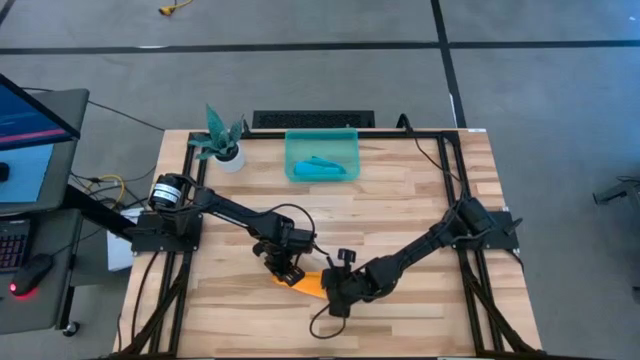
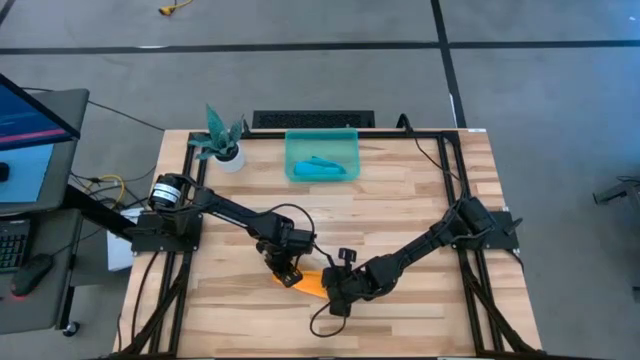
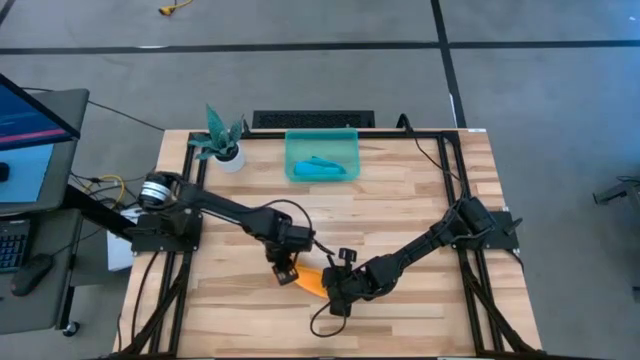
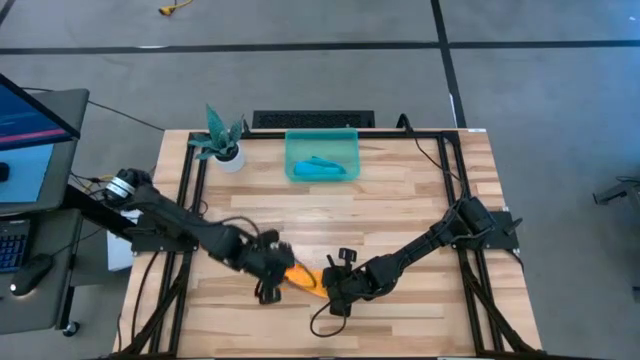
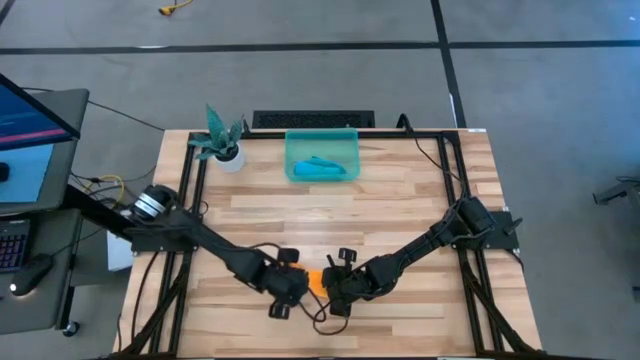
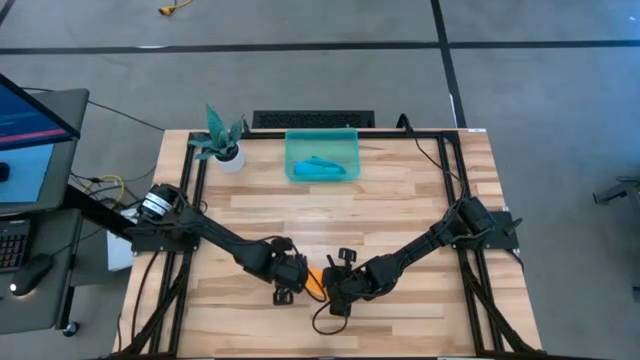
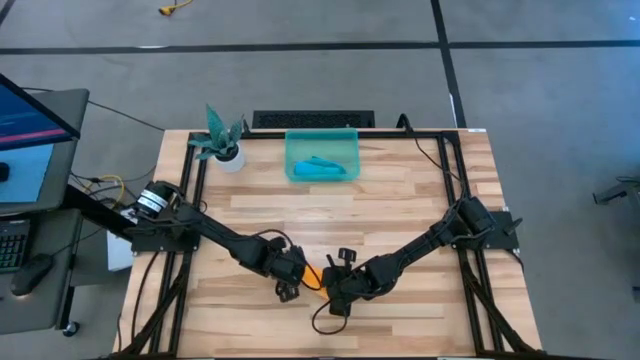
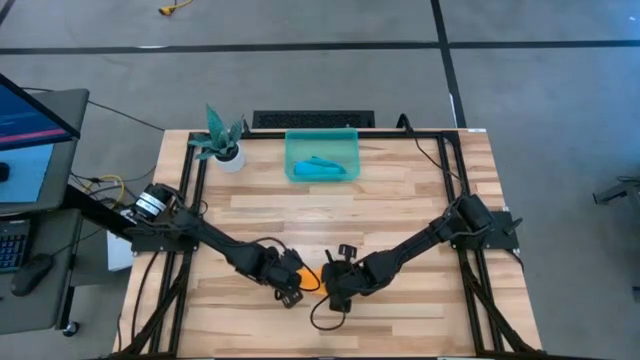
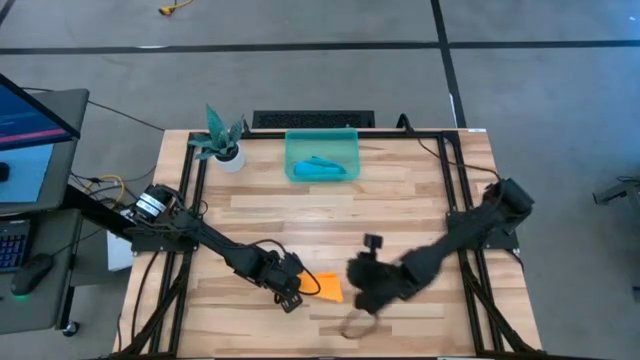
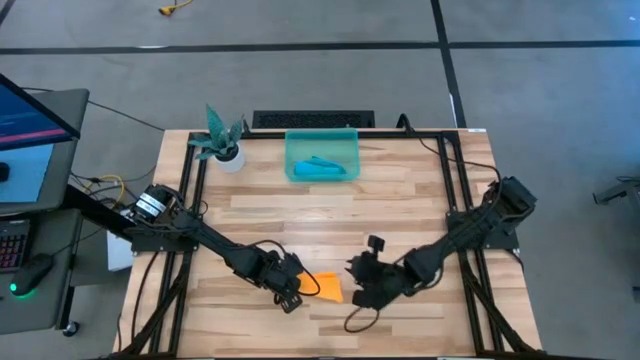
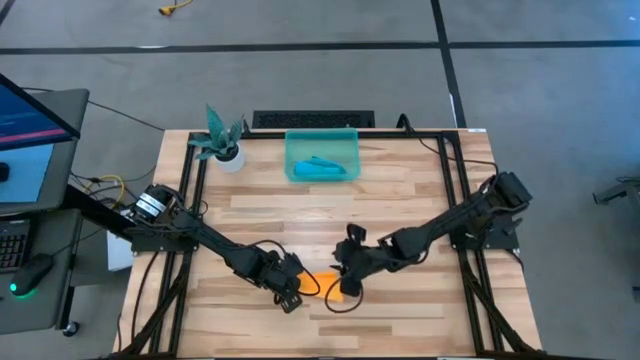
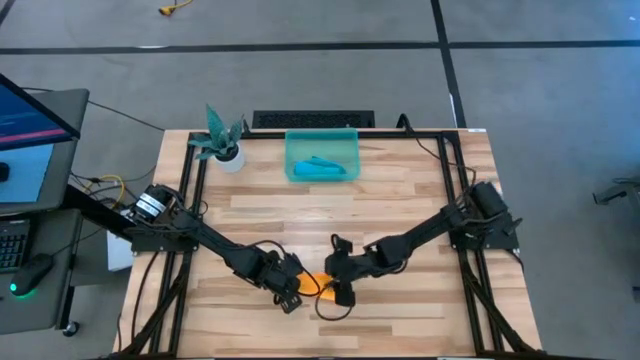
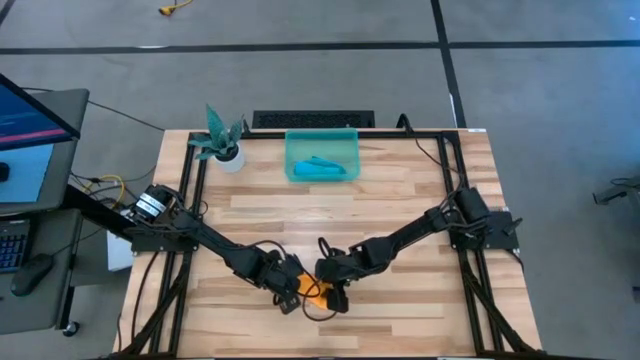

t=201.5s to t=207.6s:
Task: Roll microfiber towels into tight, uniform cylinder then place into a basket
Roll the orange microfiber cloth

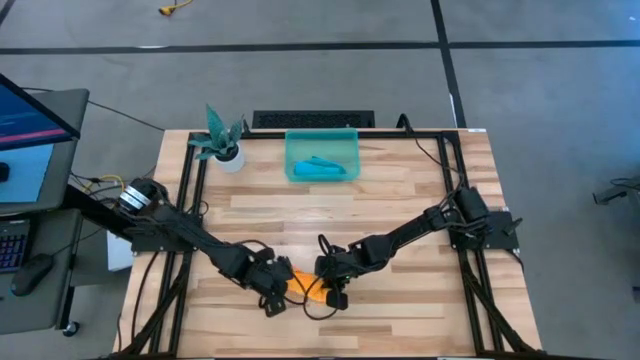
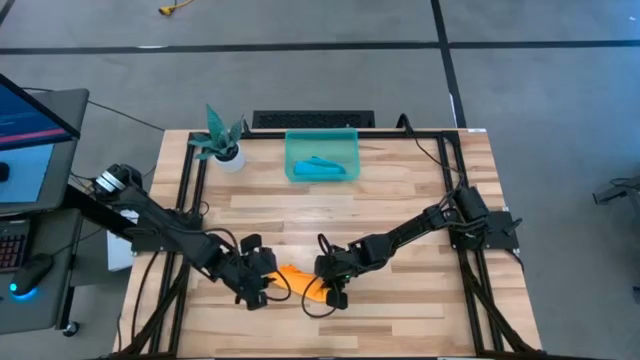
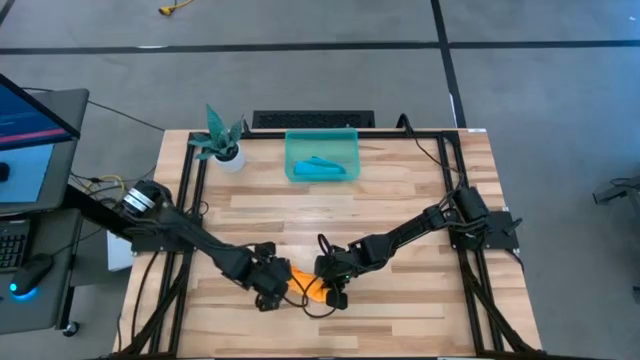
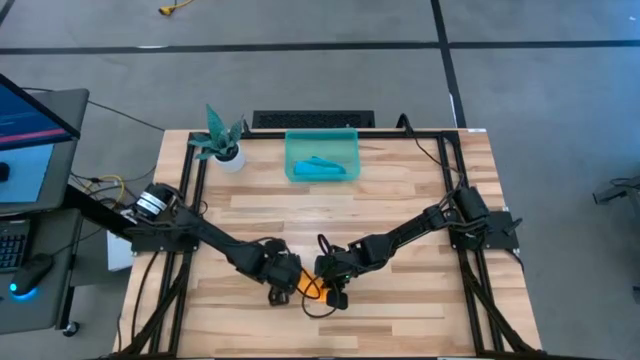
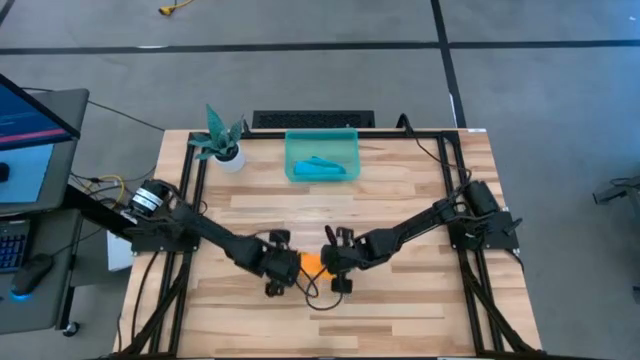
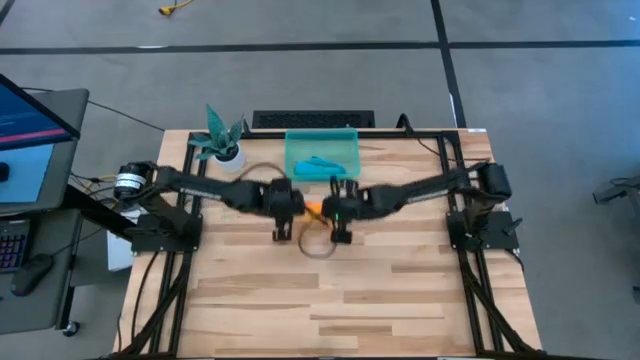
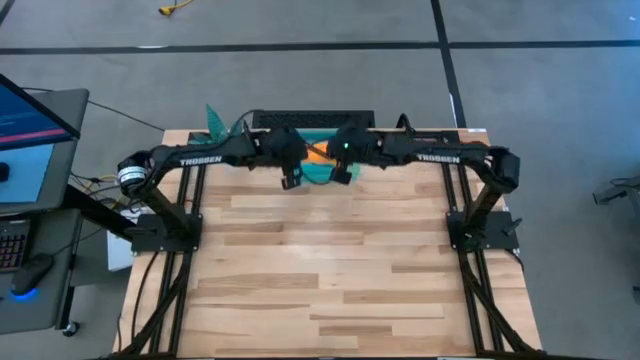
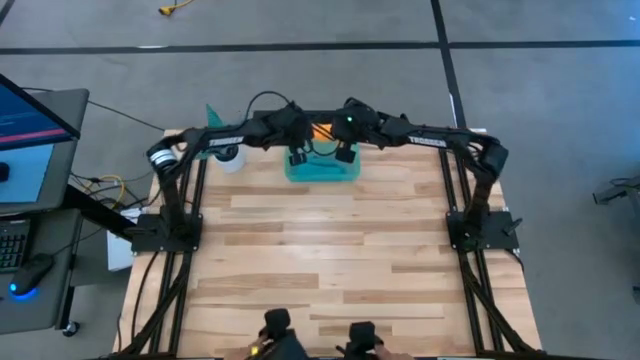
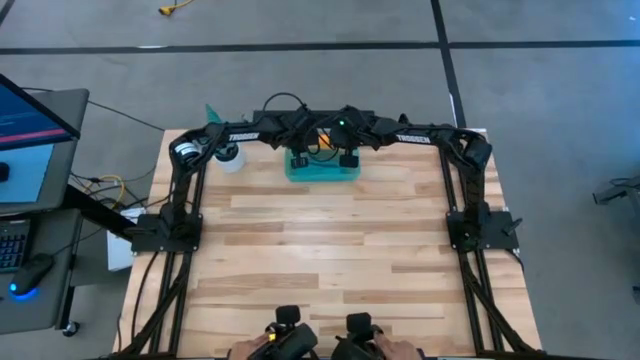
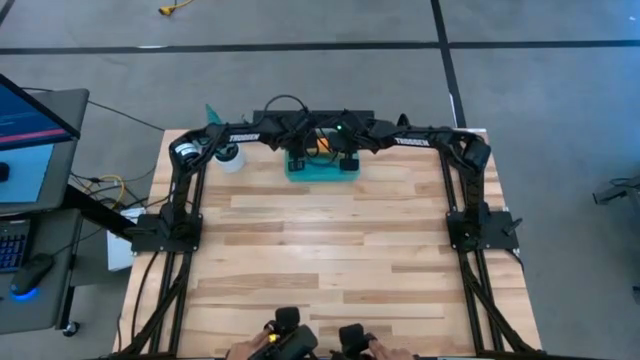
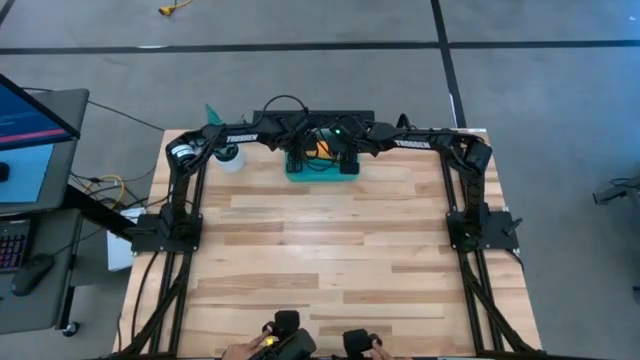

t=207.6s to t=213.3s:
Put the rolled orange microfiber cloth into the green bin

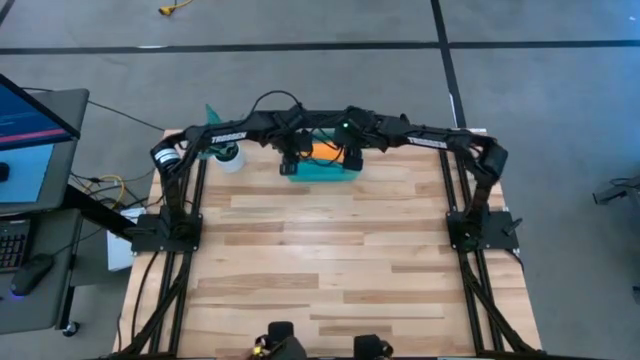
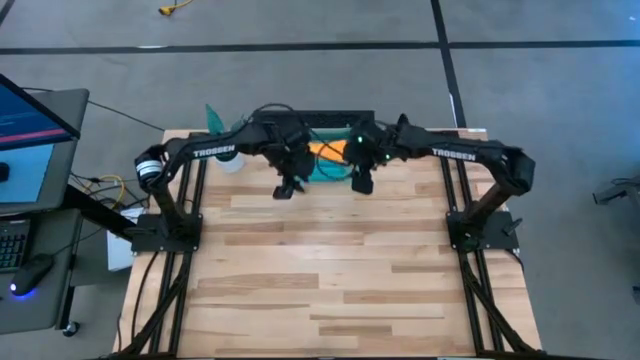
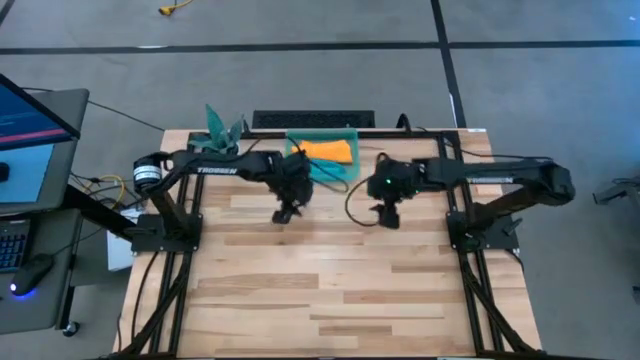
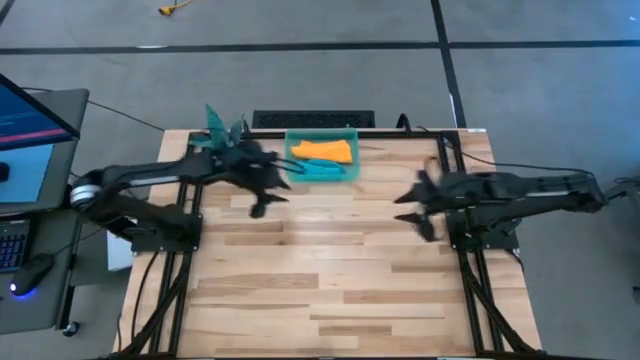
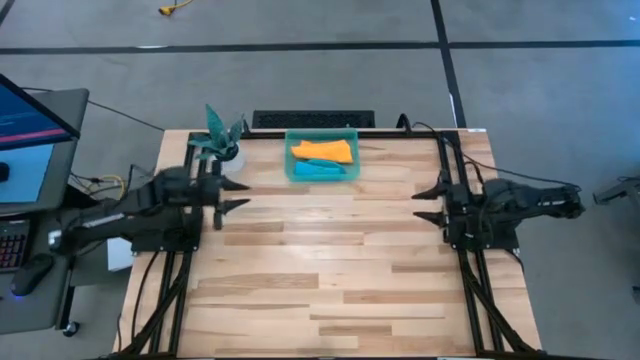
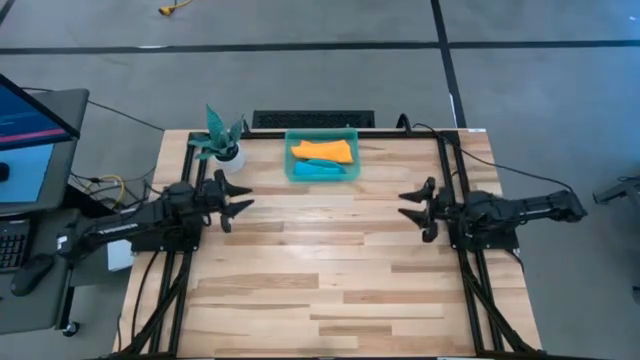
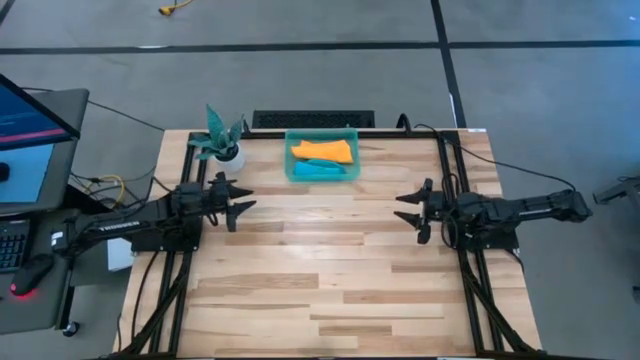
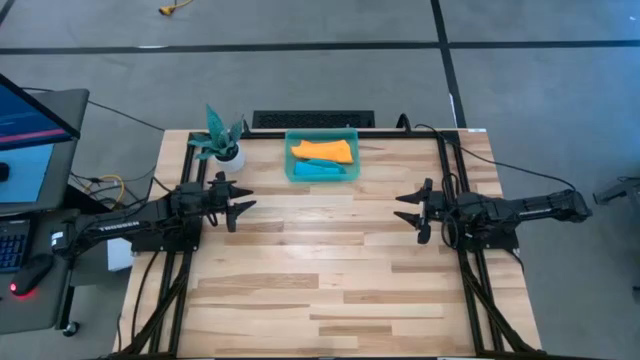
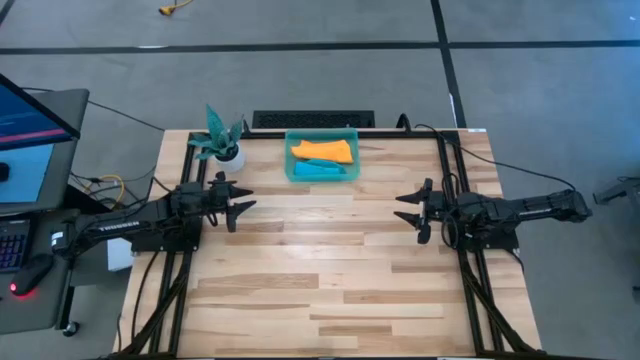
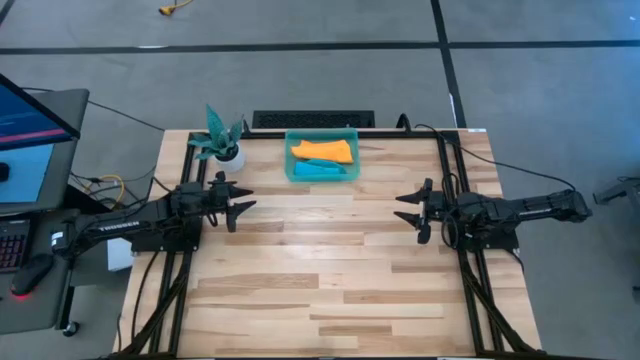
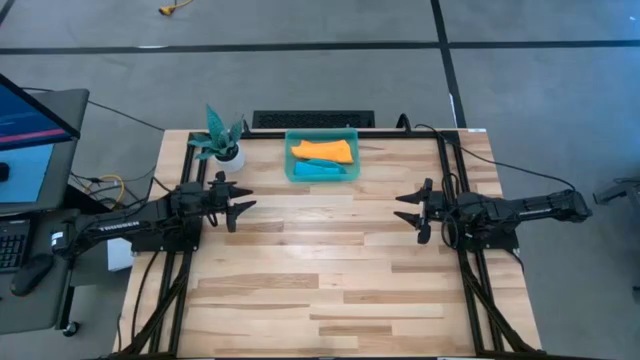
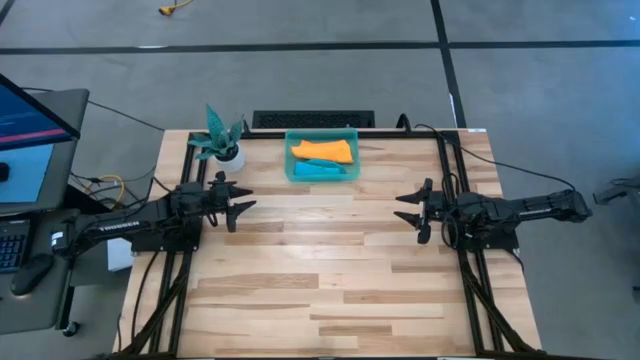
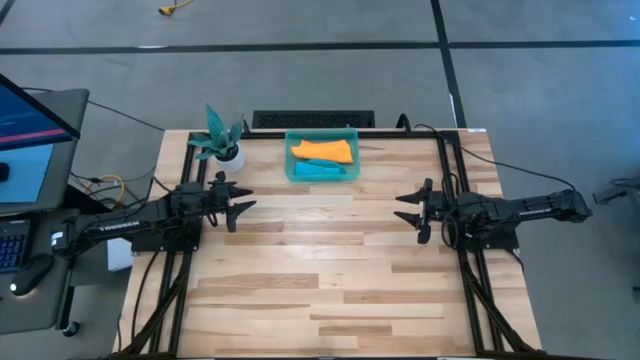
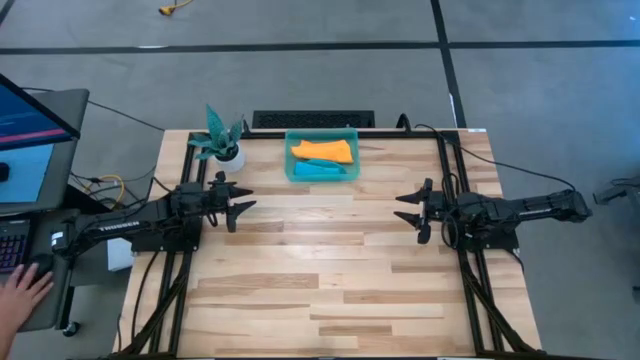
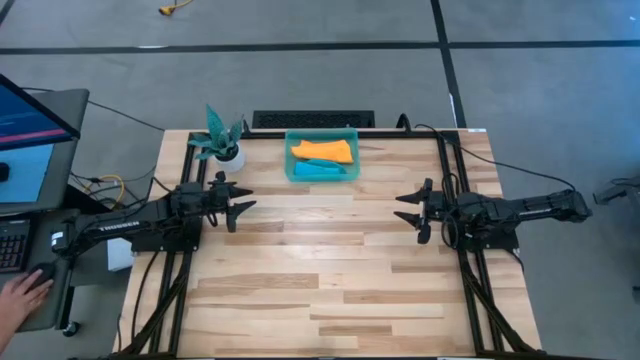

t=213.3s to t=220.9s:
Return to Home Position

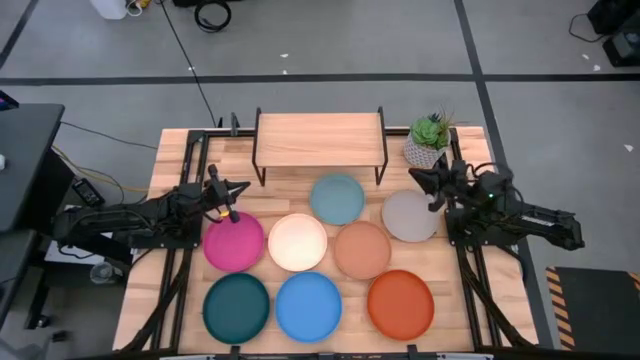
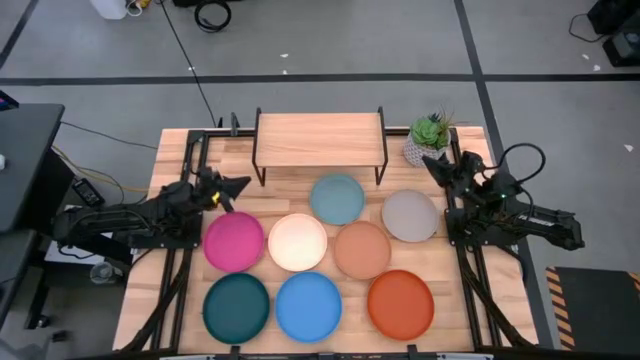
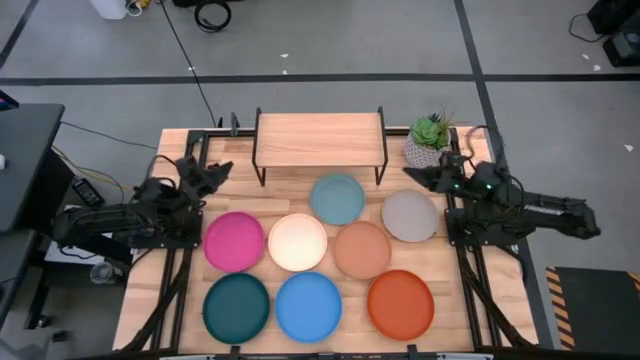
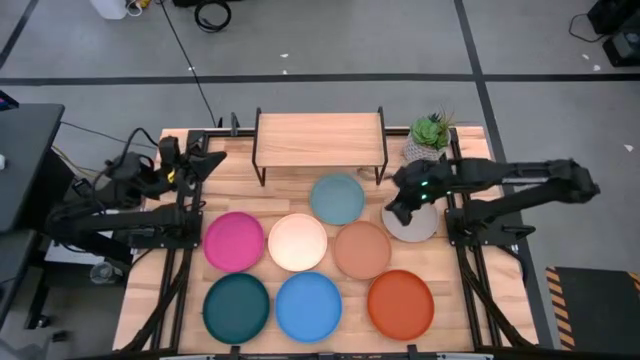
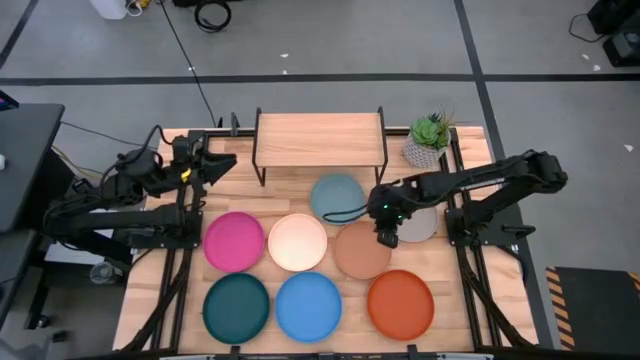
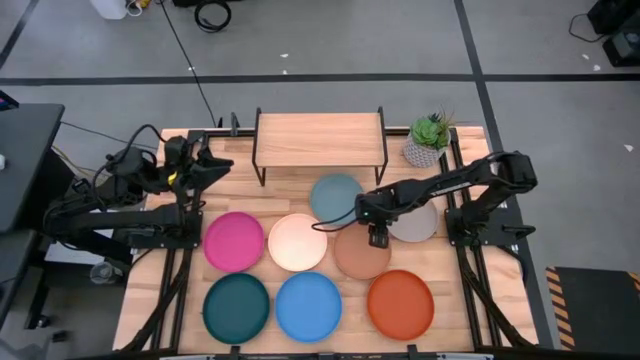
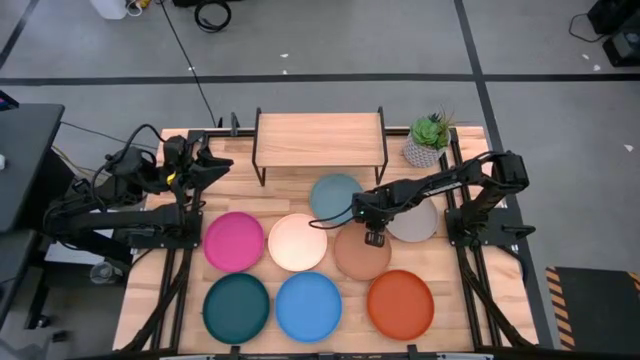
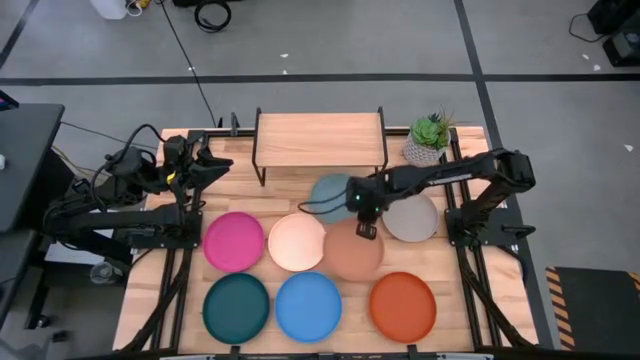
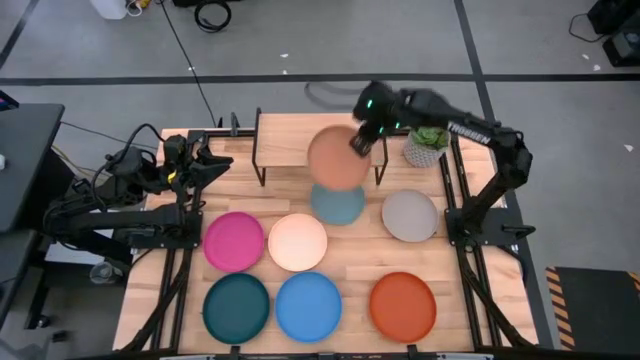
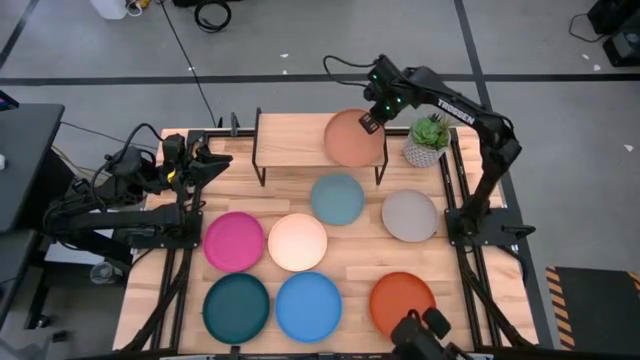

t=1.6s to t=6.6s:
Task: Place and stack plates onto a shelf
Put the brown plate on the shelf
